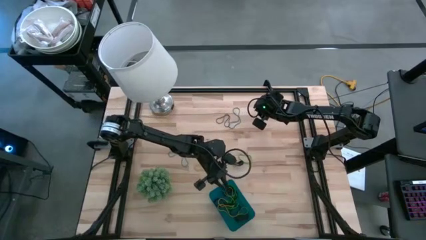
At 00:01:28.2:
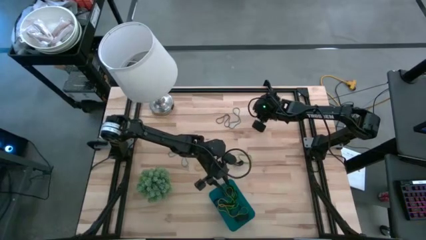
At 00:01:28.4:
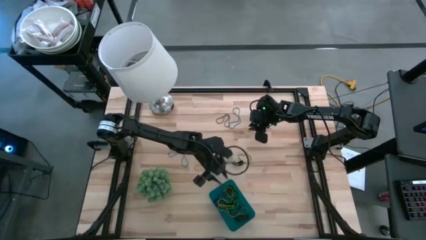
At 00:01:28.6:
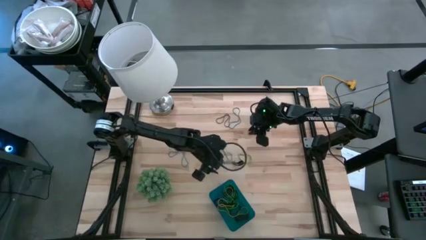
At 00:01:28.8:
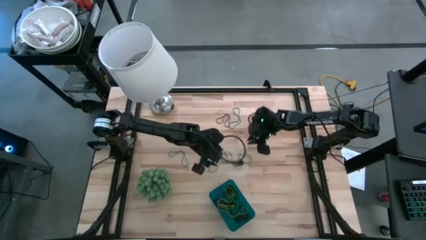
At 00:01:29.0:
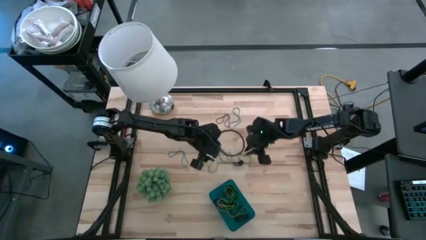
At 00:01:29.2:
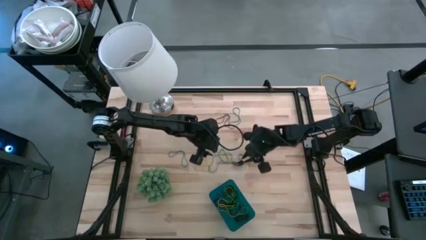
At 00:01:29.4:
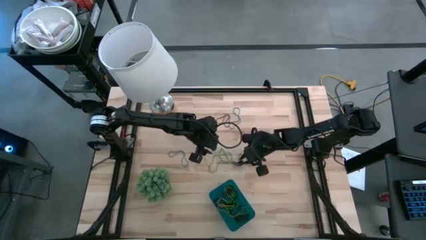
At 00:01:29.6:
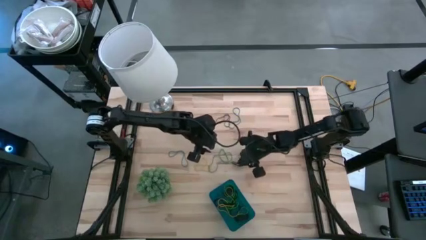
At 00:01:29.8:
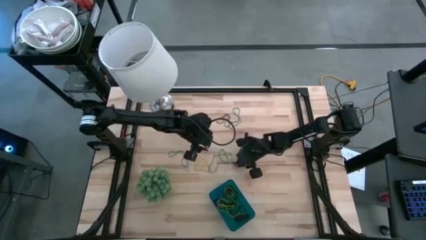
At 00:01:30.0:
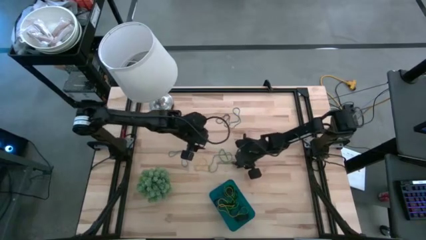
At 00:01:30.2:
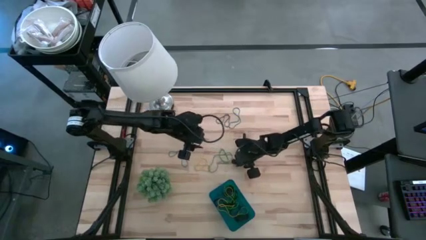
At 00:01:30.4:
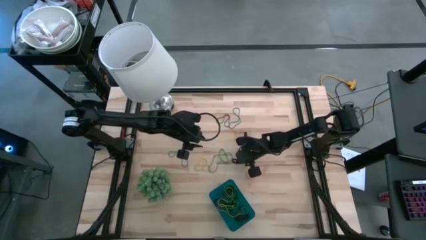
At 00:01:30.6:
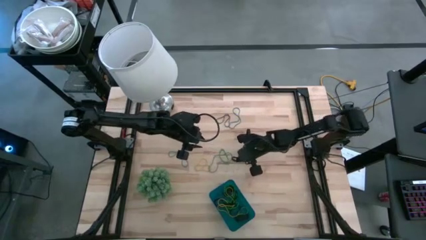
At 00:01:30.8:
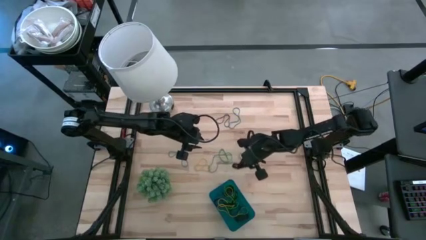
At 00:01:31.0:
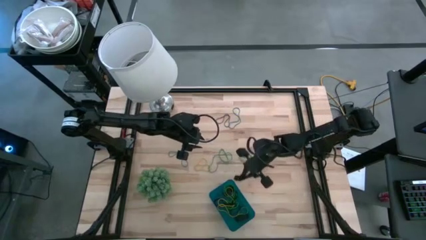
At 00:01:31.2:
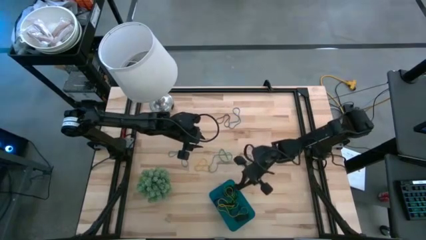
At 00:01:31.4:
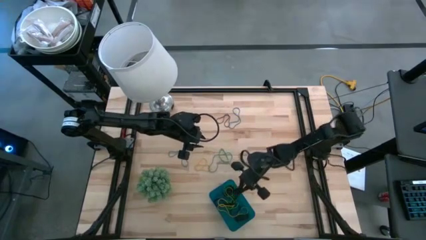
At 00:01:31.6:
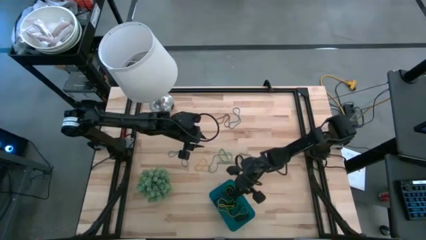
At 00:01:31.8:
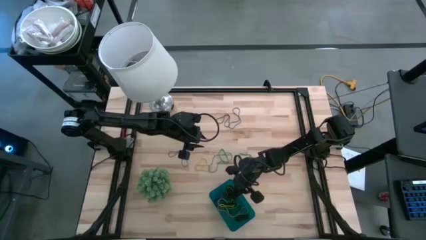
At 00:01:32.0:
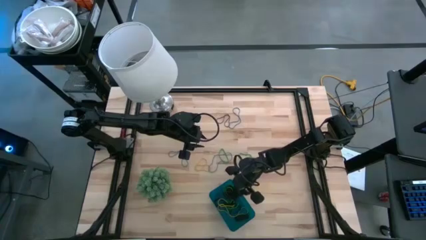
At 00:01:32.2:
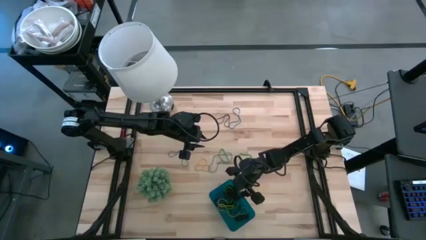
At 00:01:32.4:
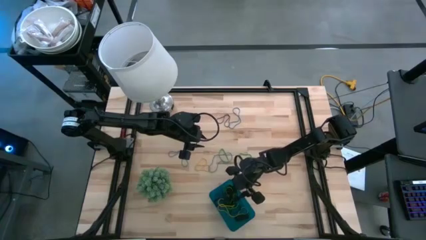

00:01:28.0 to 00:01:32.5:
Task: Pick and place rubber bands into bin
Put the black rubber band into the blue bin

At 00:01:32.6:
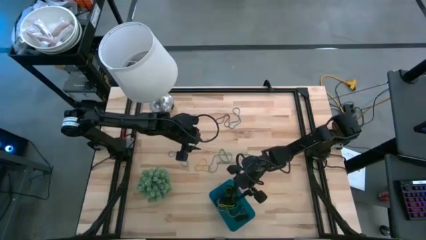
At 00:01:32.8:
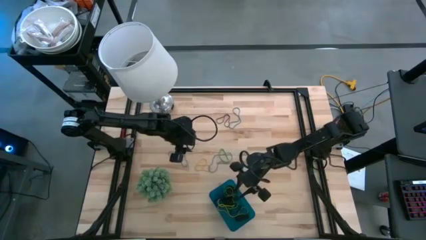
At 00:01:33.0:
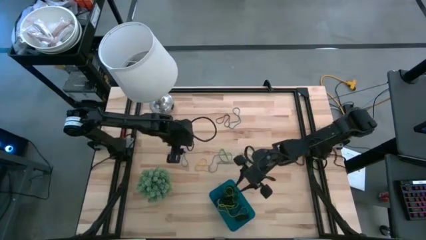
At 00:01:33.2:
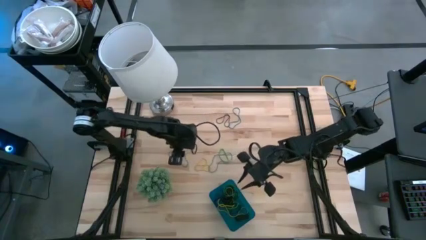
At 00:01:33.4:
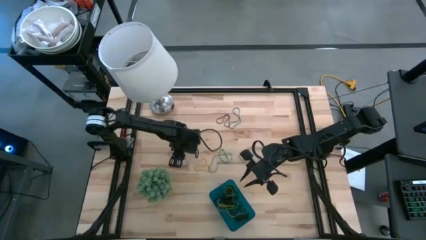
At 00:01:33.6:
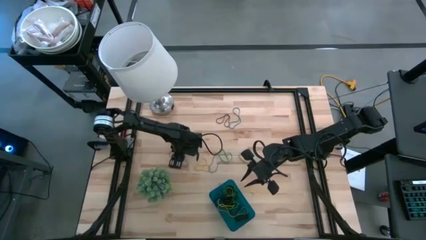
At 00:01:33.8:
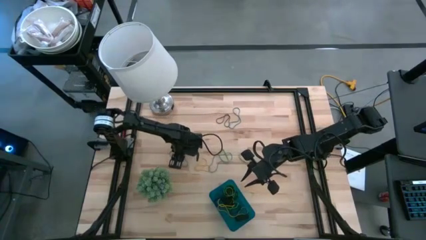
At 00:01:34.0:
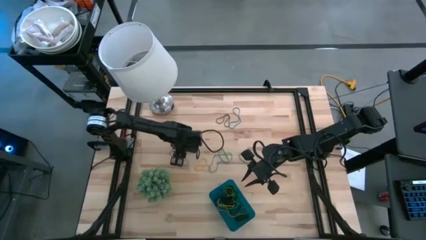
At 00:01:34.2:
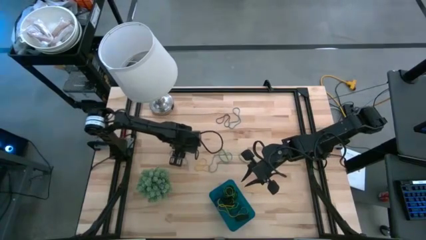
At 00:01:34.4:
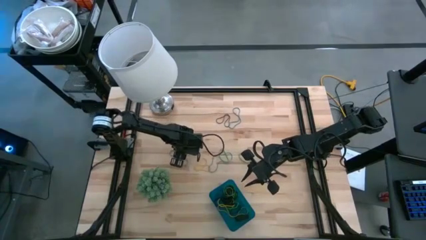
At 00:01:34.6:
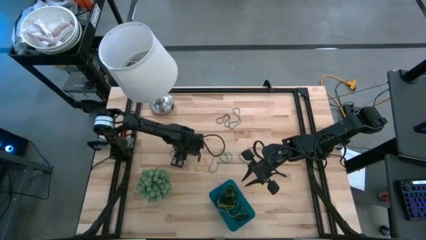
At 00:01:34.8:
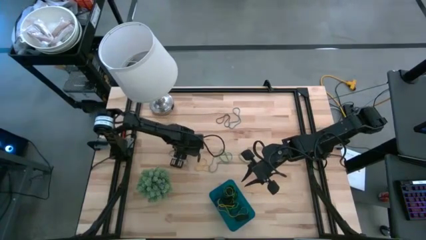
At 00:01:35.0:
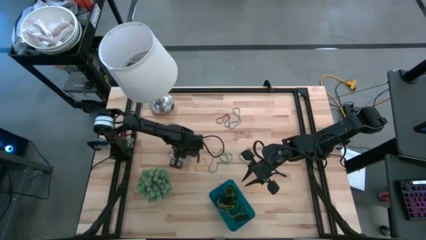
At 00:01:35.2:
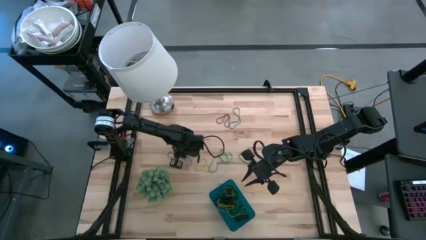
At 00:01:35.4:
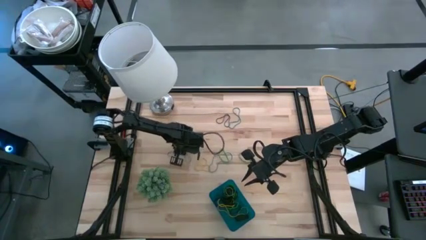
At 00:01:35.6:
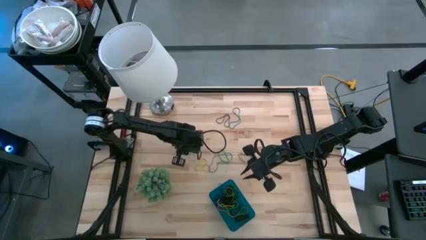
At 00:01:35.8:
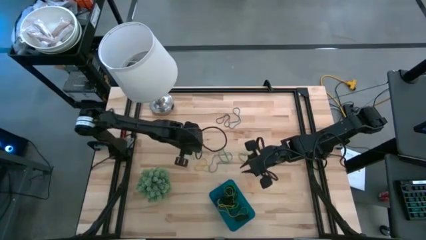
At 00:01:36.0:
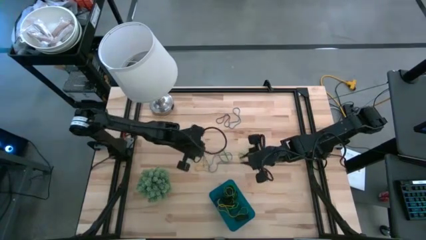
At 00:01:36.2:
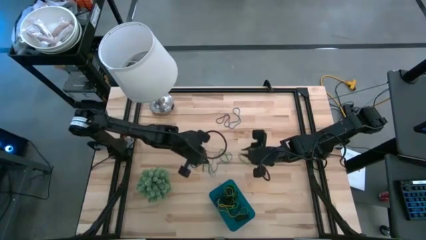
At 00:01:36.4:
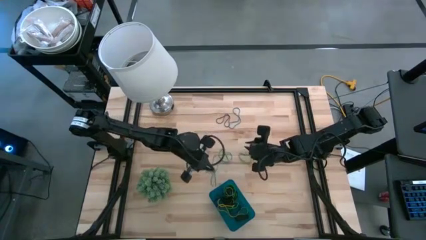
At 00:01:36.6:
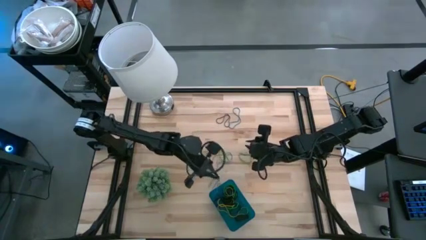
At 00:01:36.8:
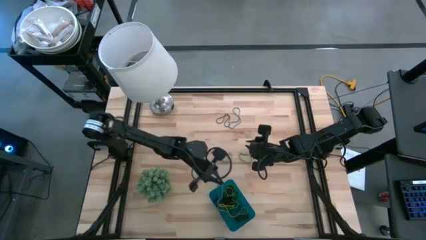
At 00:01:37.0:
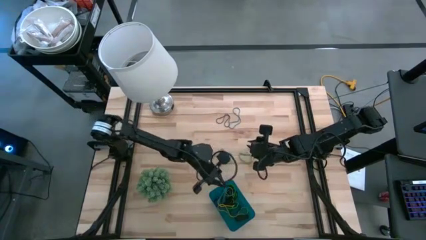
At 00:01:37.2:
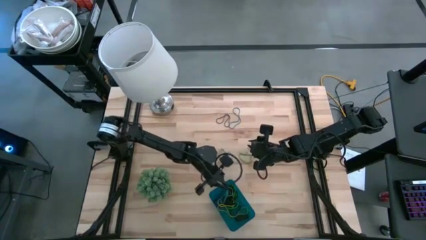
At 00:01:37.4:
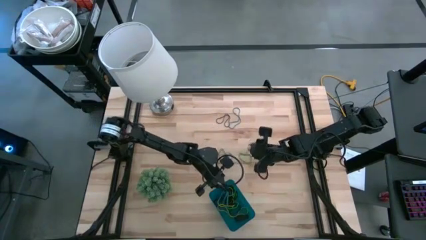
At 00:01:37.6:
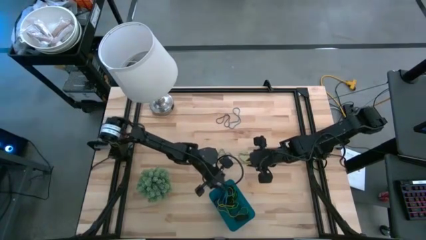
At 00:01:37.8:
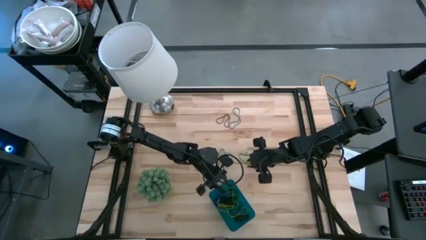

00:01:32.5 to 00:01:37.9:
Put the blue rubber band into the blue bin

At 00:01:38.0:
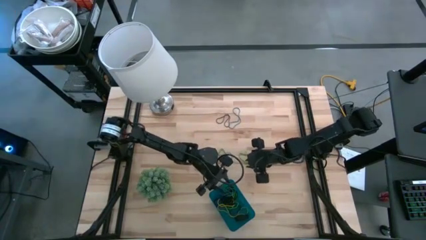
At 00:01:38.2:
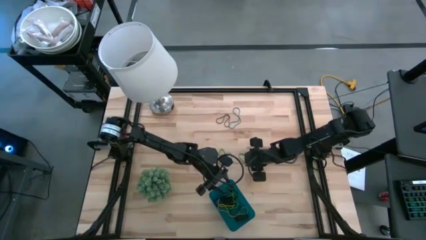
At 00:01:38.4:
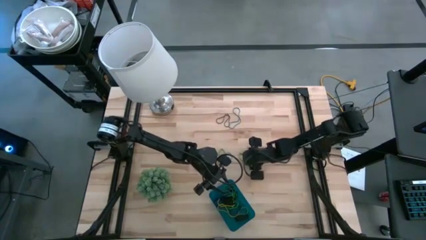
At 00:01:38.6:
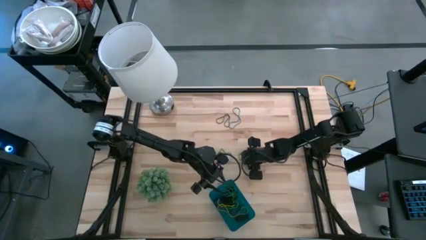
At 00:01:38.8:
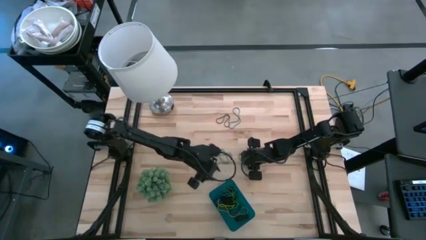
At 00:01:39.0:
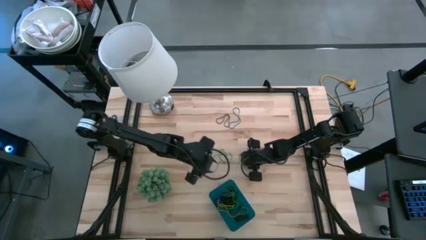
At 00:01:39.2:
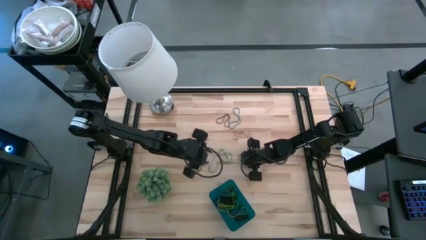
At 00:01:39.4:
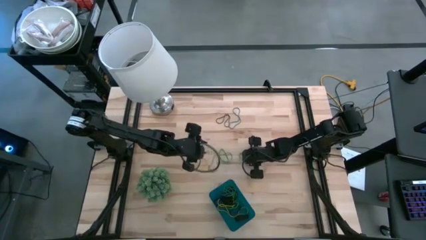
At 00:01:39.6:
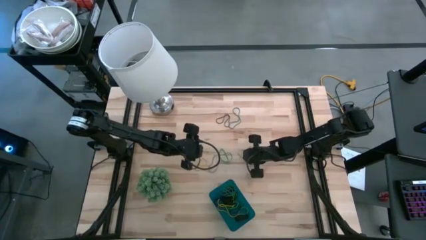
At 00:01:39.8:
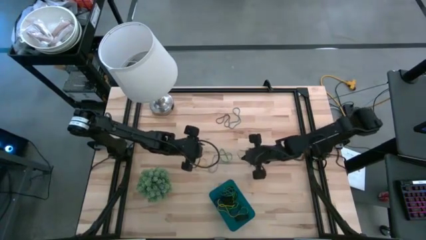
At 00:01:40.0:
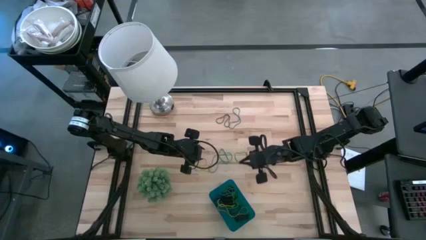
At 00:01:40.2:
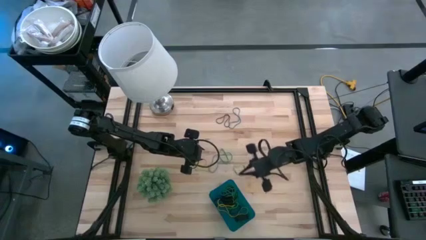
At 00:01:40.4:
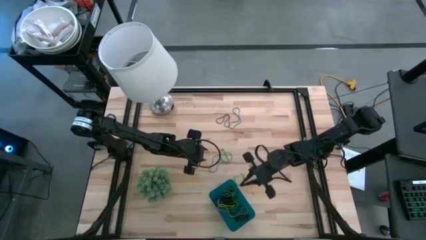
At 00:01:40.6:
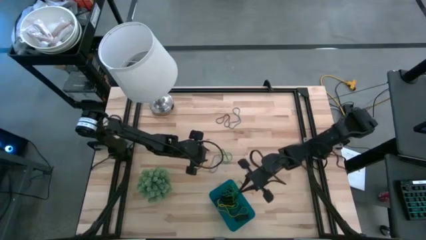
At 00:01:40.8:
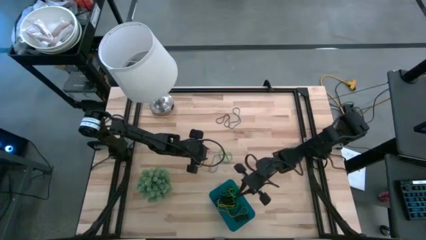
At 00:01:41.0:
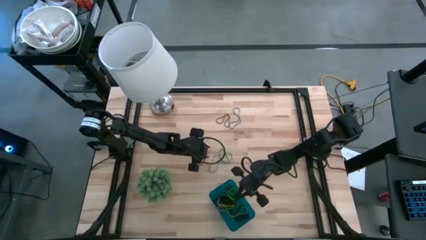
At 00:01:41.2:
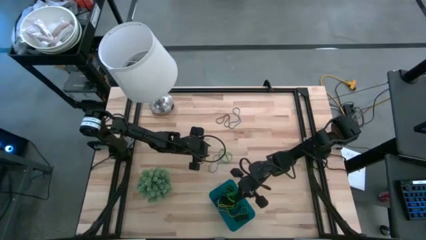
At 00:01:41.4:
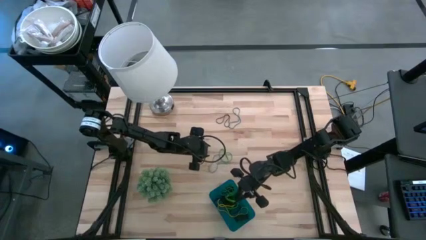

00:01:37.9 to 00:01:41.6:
Put the green rubber band into the blue bin

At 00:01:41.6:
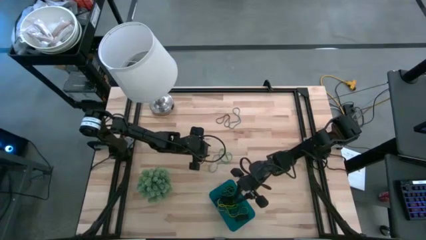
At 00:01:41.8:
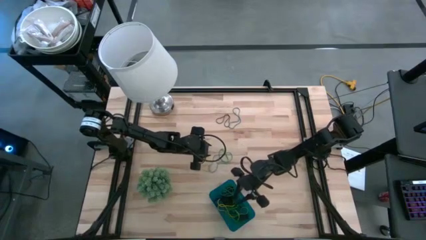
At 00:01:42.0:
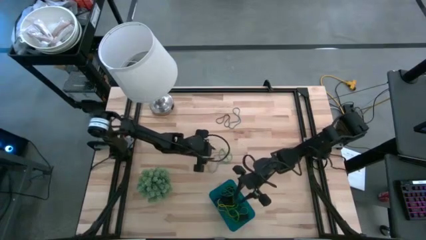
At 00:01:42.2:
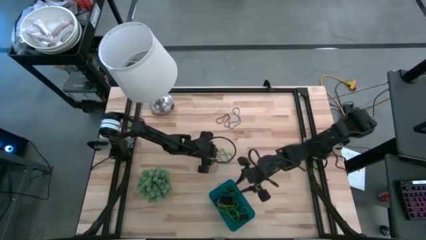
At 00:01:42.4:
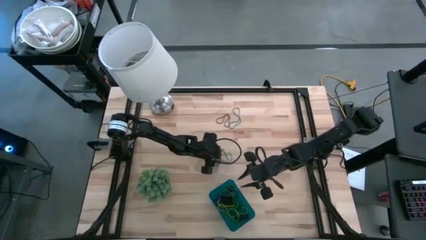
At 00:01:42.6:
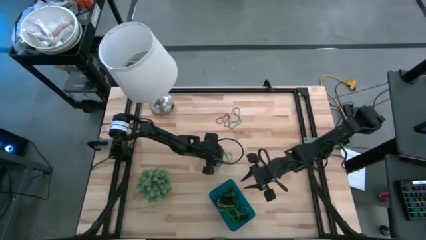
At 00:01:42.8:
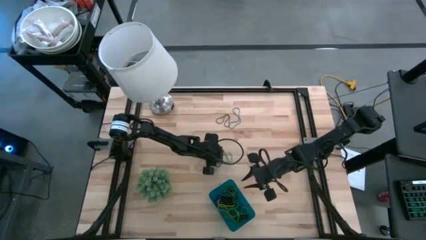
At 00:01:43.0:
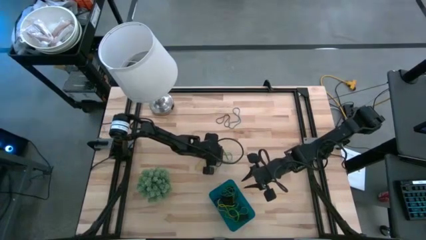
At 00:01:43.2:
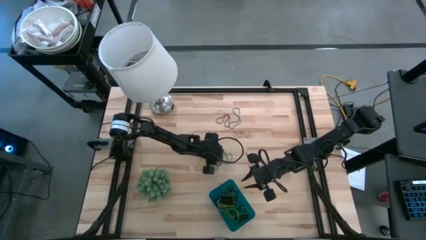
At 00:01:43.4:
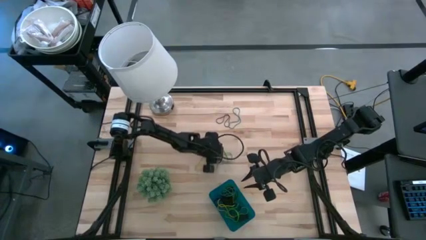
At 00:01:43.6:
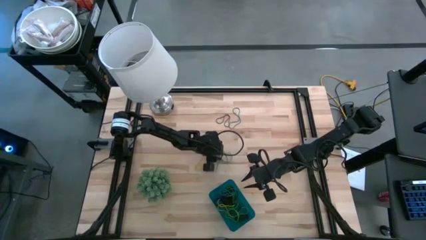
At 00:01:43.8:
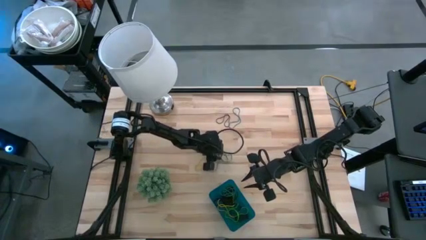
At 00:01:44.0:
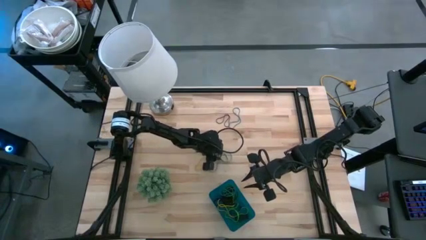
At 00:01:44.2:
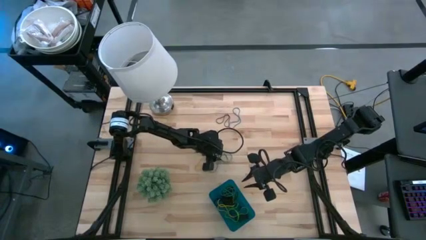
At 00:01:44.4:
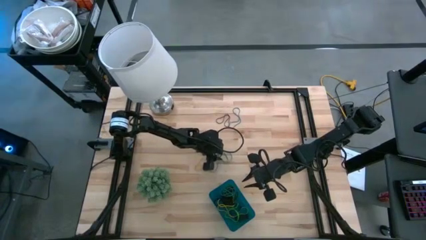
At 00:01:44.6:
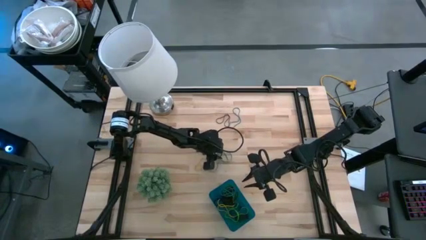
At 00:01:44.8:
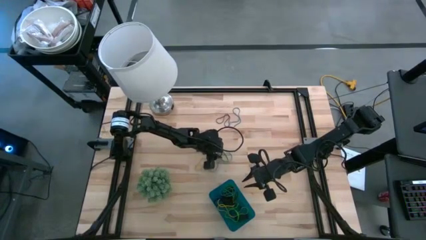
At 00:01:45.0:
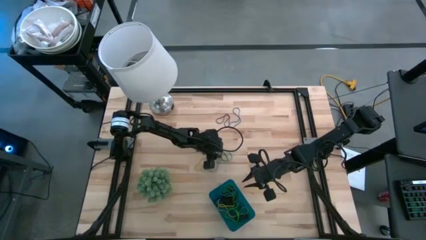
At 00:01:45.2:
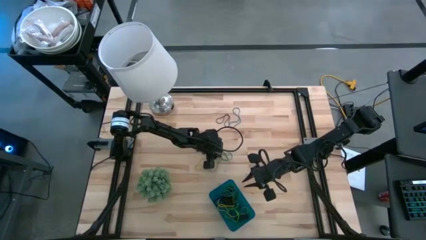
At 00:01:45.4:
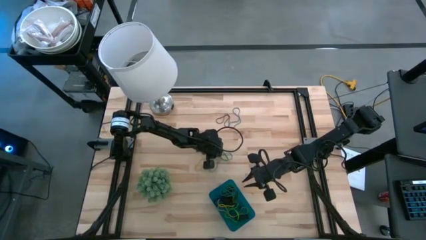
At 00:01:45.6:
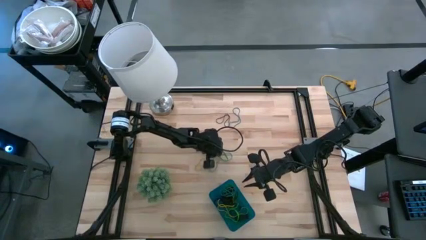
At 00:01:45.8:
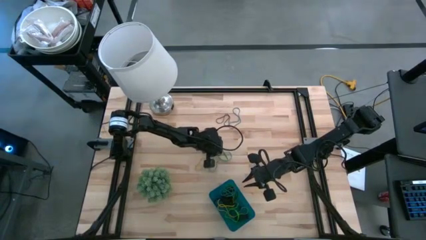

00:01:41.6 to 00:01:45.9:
Put the blue rubber band into the blue bin
